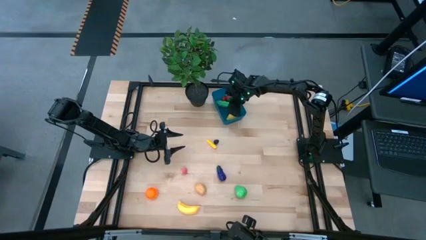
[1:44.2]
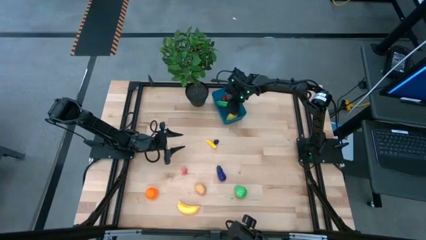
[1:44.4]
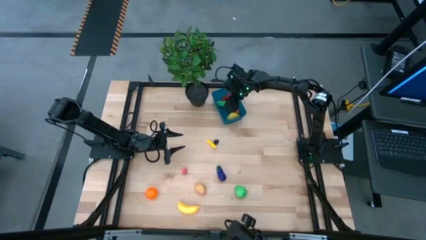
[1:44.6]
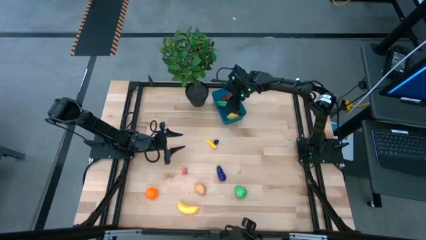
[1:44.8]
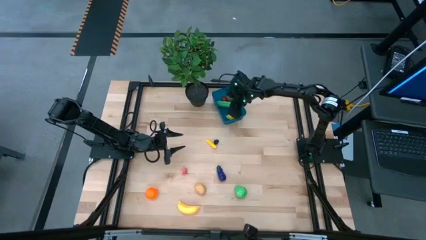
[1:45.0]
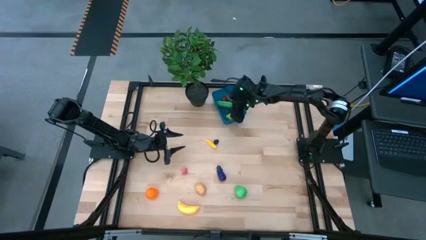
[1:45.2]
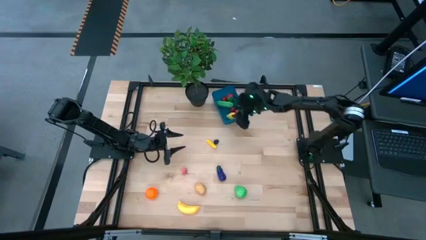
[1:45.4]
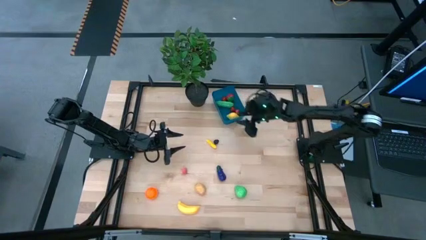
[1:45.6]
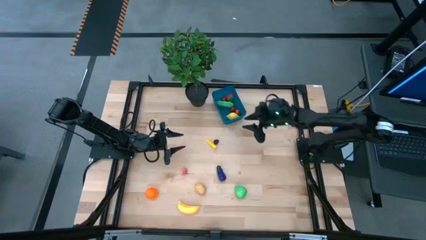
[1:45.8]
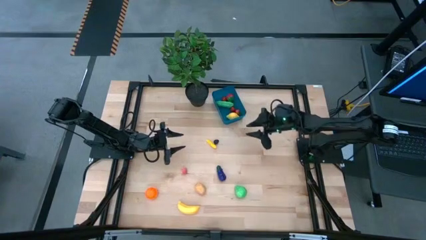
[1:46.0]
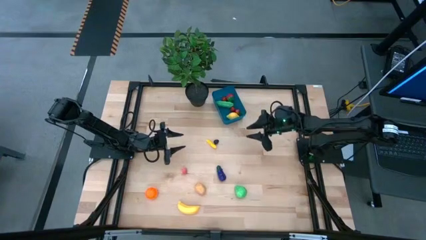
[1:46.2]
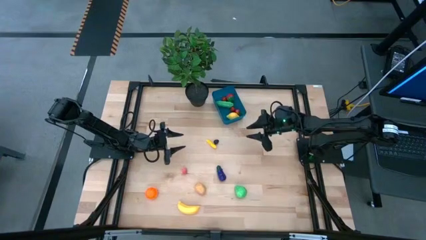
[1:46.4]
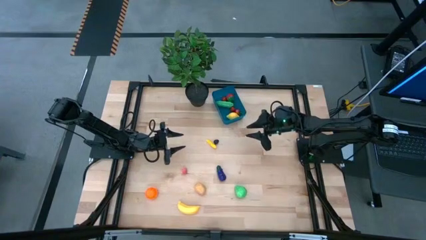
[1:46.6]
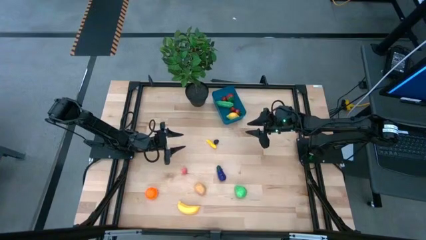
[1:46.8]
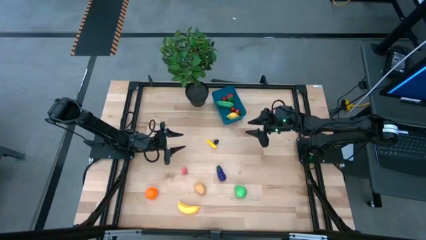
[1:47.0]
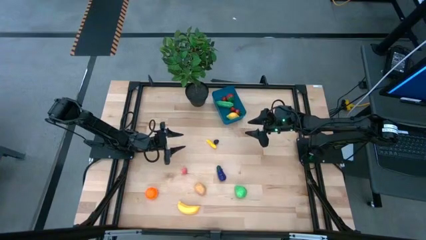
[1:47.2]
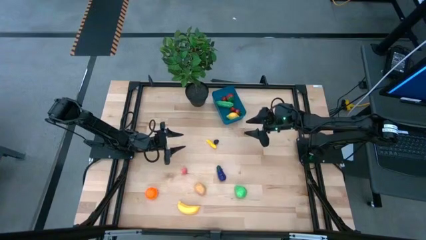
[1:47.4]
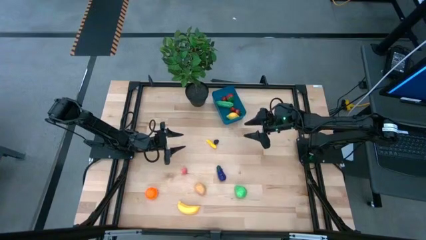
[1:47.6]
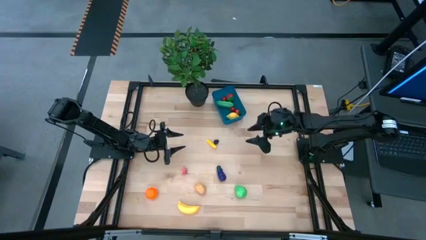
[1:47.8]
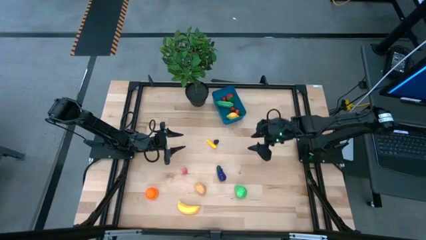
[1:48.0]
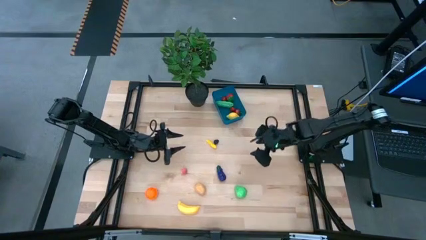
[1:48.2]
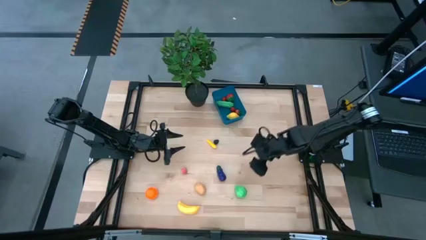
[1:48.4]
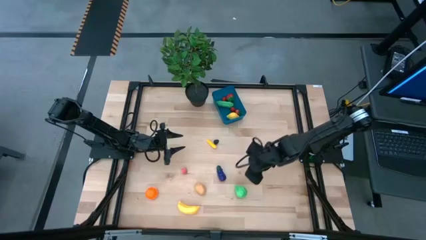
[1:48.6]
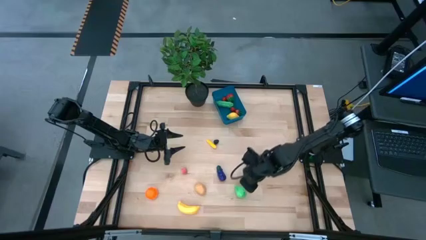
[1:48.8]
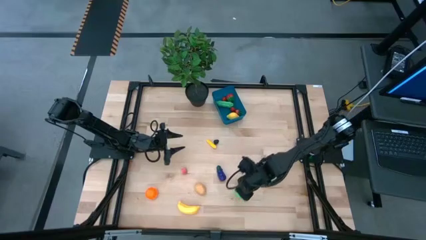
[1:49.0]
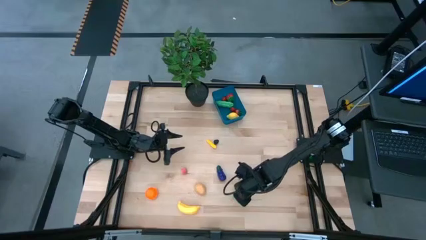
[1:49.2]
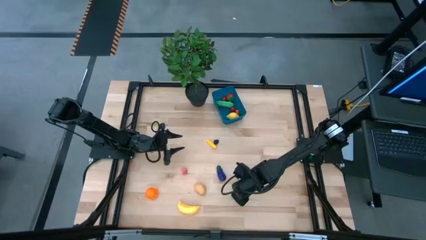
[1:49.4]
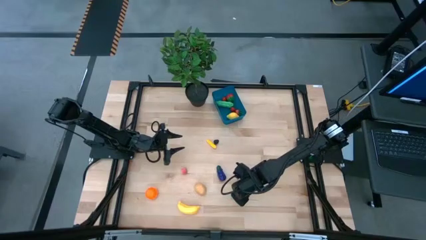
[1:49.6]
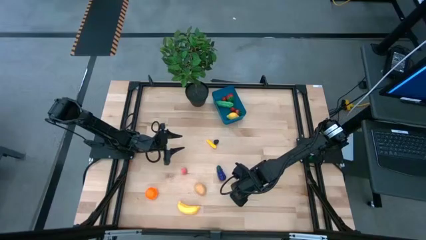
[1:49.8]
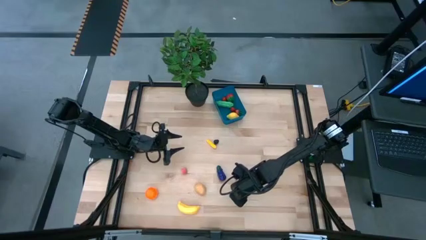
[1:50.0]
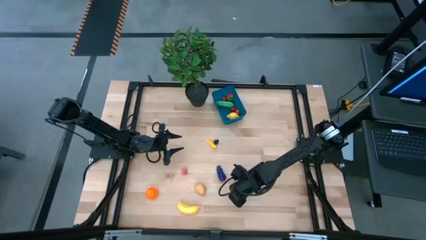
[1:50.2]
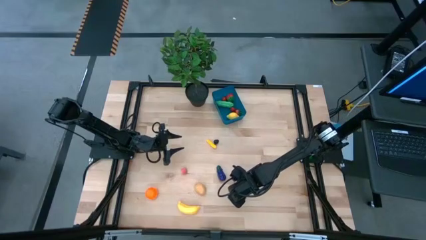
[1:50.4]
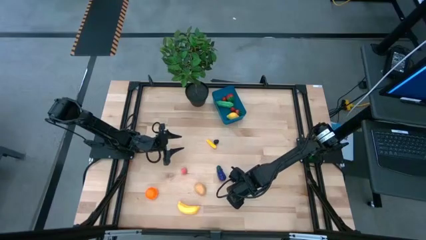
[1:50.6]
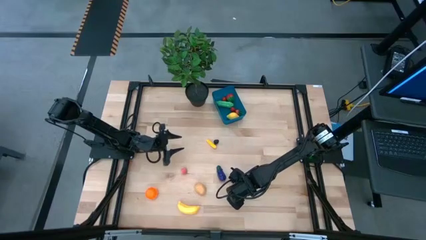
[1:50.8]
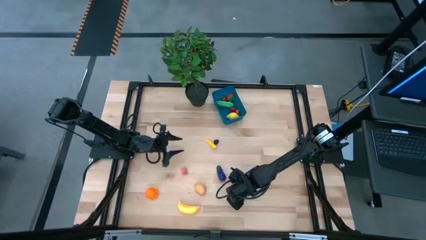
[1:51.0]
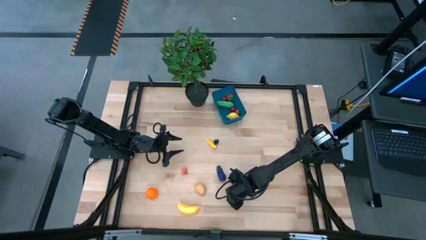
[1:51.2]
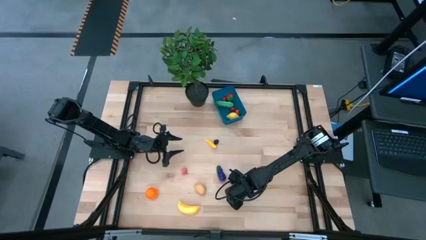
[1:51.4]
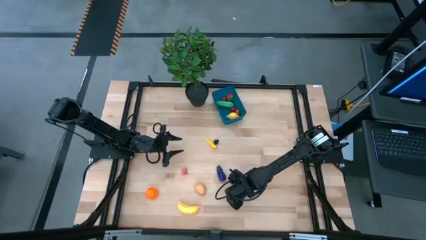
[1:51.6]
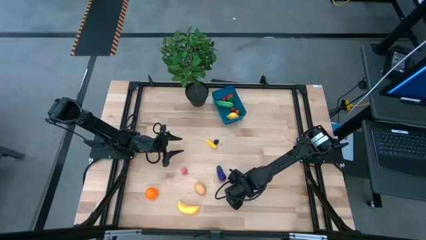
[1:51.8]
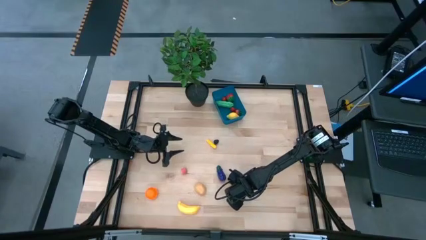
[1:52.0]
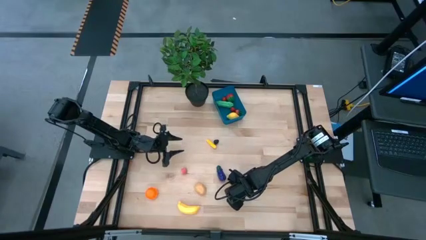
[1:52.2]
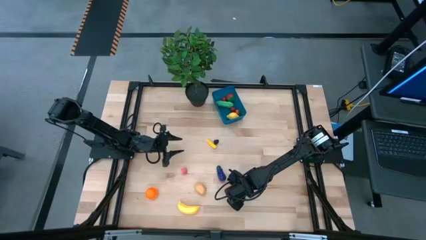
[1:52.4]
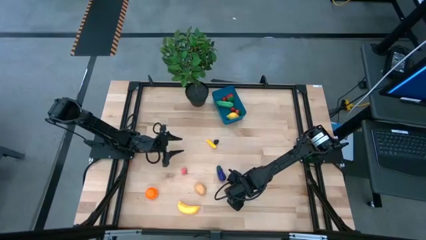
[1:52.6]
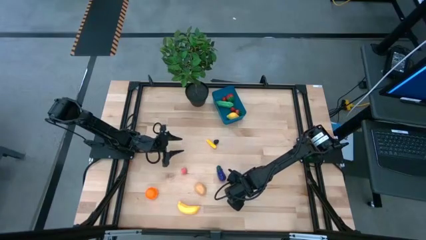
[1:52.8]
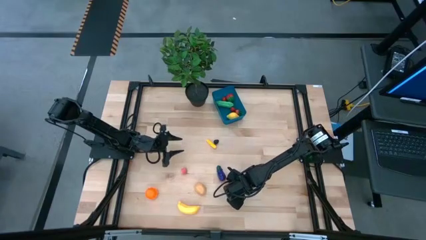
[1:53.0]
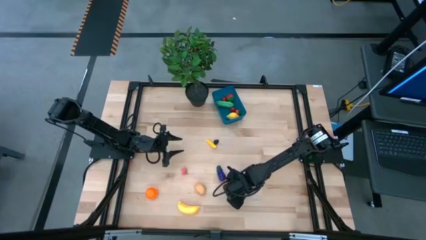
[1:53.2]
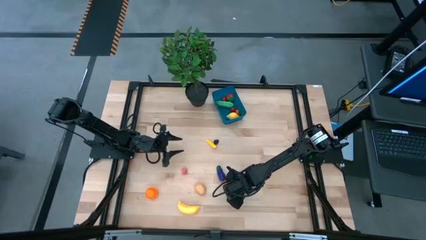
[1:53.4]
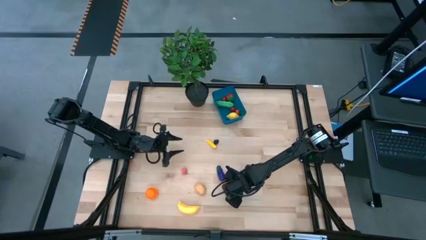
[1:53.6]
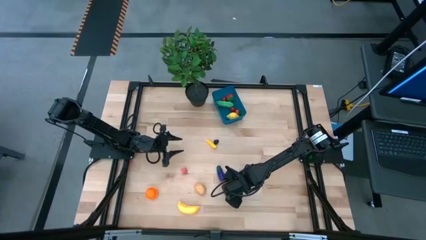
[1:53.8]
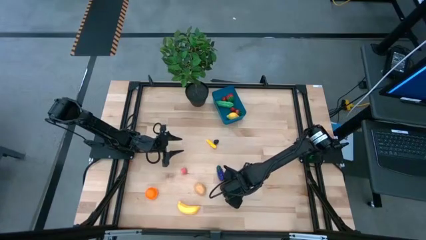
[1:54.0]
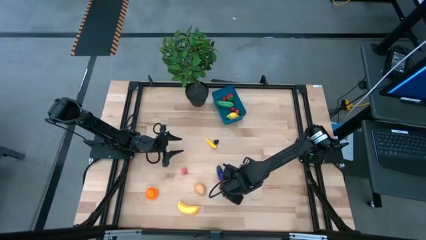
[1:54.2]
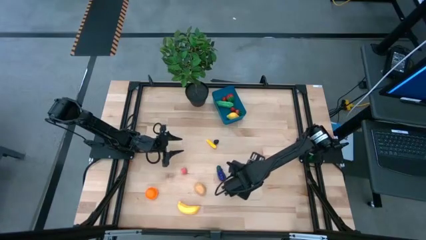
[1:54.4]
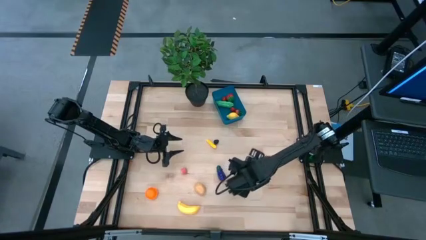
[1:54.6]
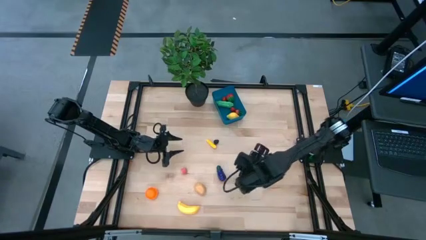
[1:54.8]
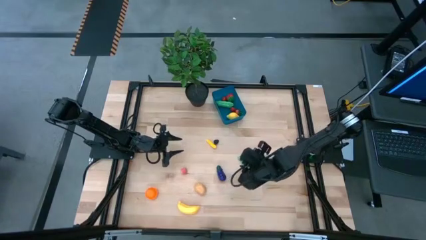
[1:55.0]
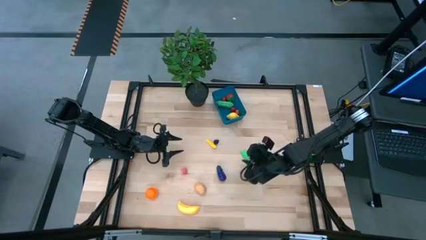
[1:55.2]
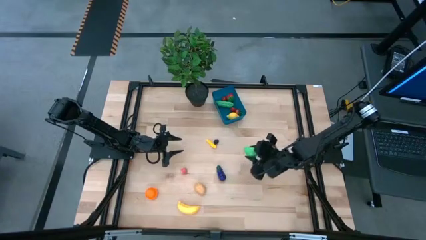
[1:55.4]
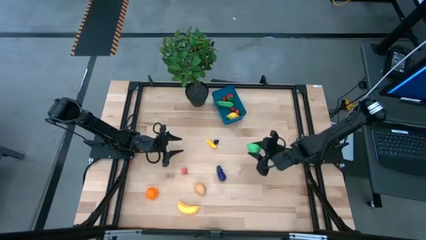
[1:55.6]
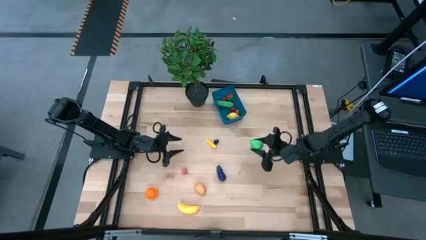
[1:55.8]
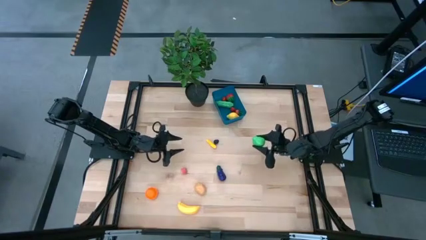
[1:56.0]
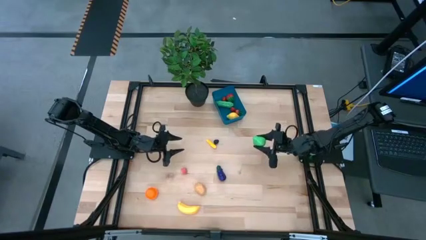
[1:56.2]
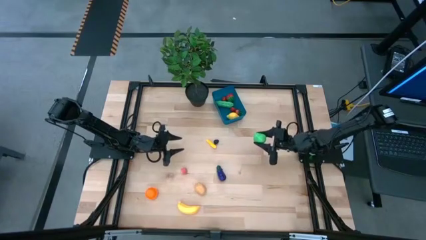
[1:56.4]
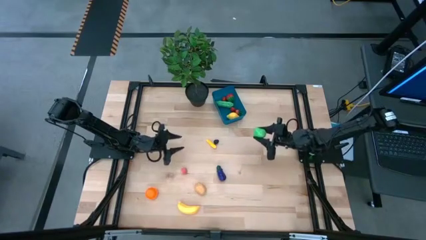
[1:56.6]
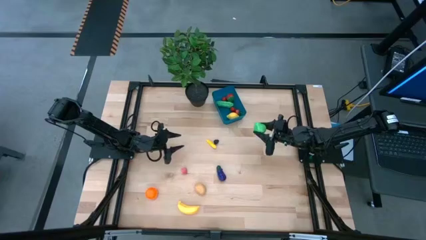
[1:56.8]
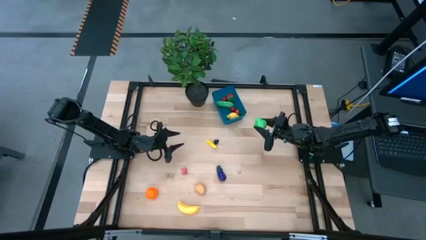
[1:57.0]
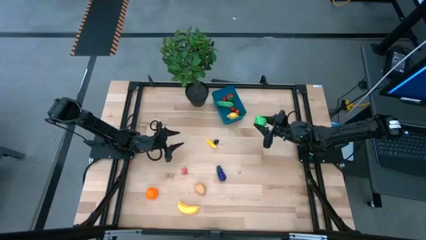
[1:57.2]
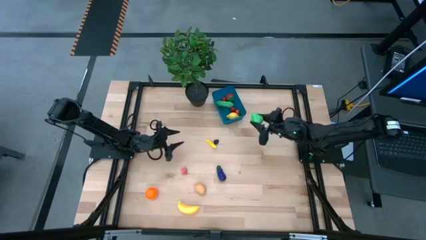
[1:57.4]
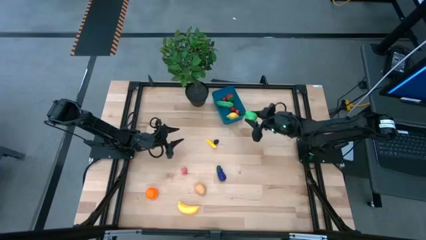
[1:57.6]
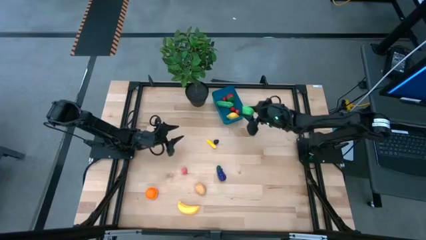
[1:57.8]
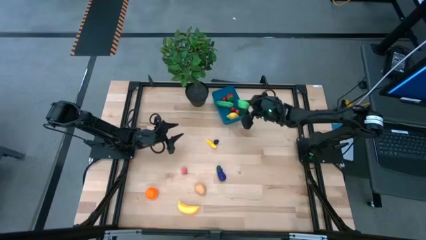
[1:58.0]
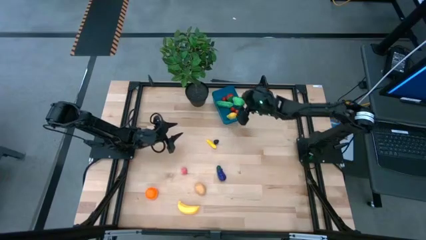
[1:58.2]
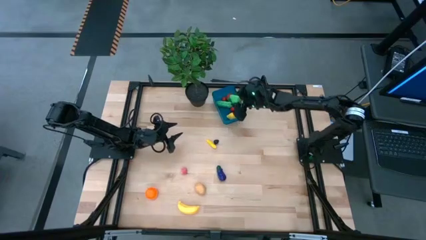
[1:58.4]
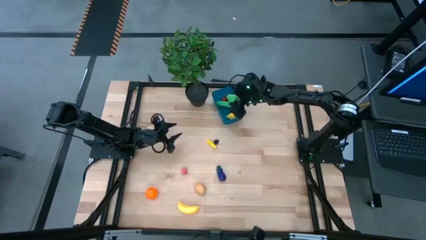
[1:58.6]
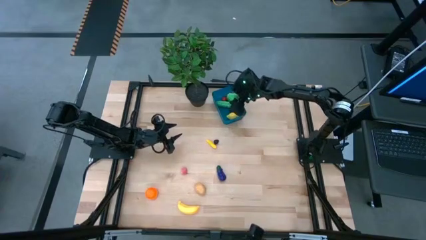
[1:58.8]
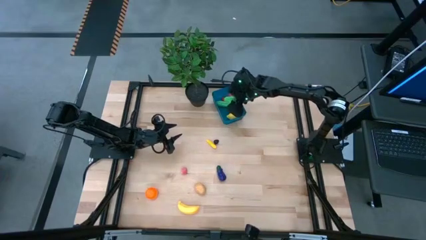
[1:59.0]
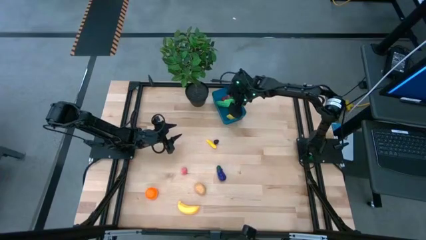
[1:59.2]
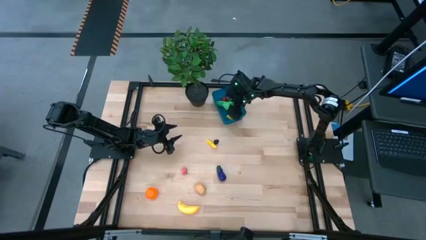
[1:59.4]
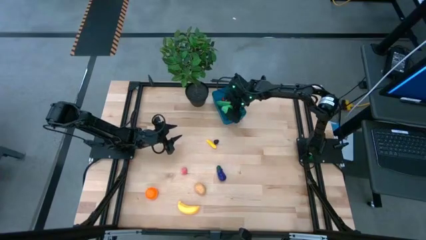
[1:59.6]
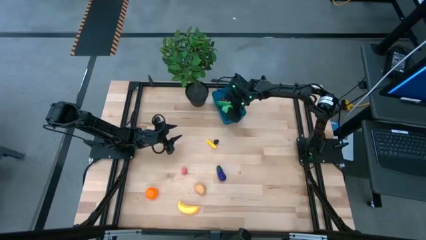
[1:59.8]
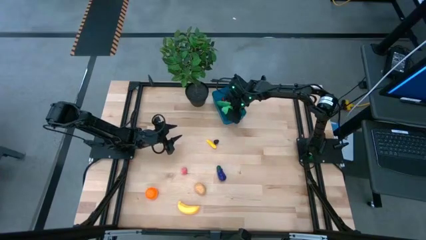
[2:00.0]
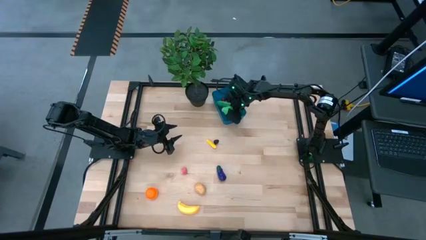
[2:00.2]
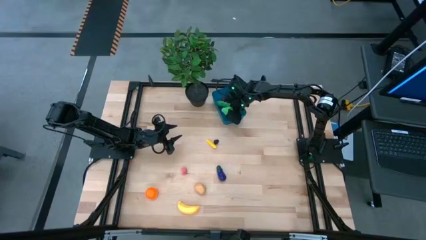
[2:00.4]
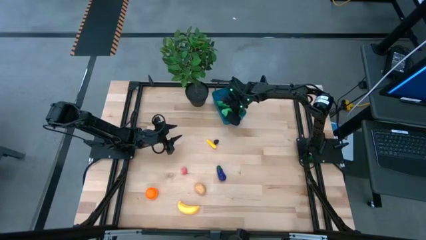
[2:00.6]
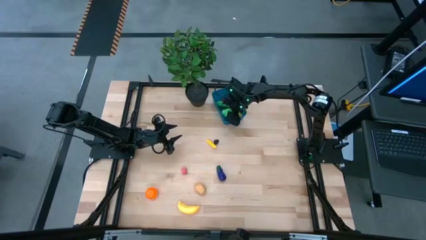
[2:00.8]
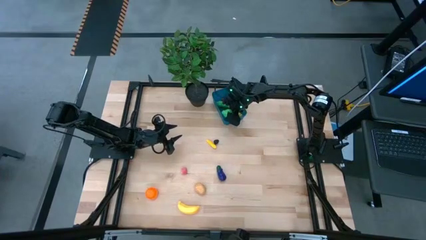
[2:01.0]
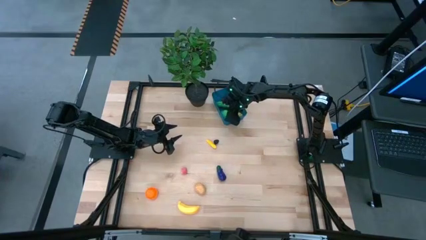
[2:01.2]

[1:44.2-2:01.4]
Task: Pick and placing Produce into tupperware
Put the pear into the blue bin
